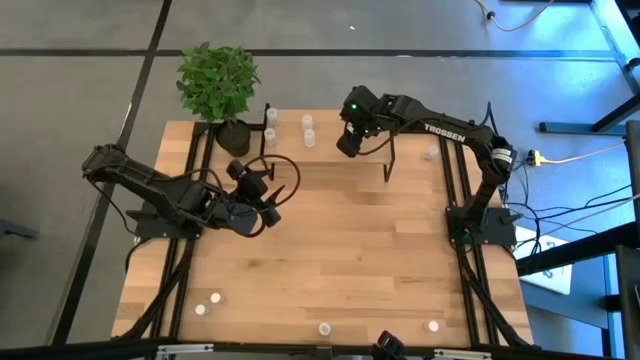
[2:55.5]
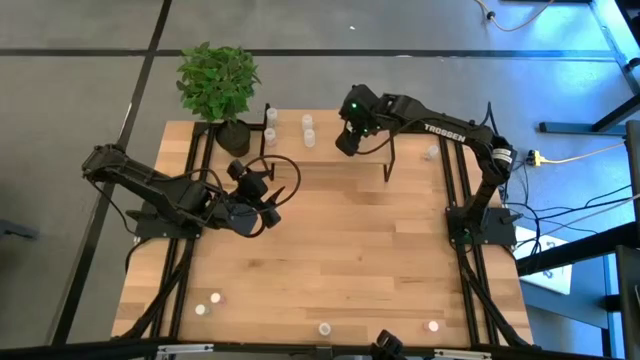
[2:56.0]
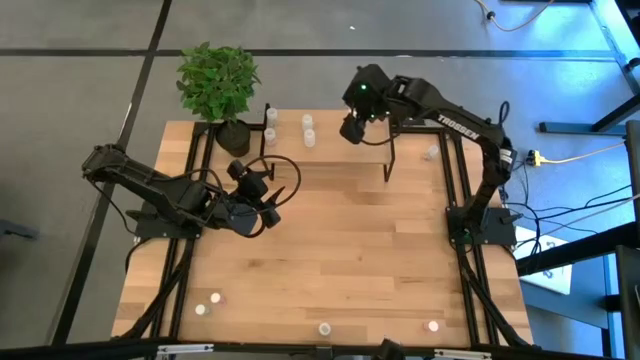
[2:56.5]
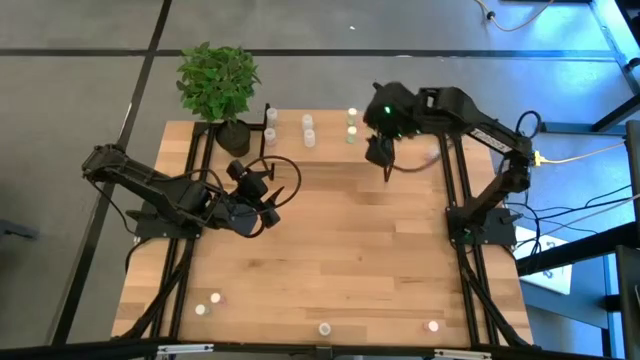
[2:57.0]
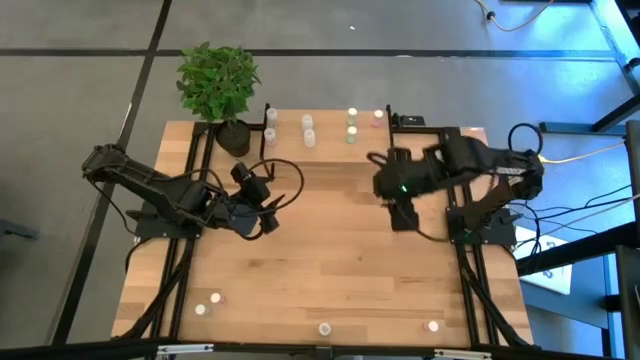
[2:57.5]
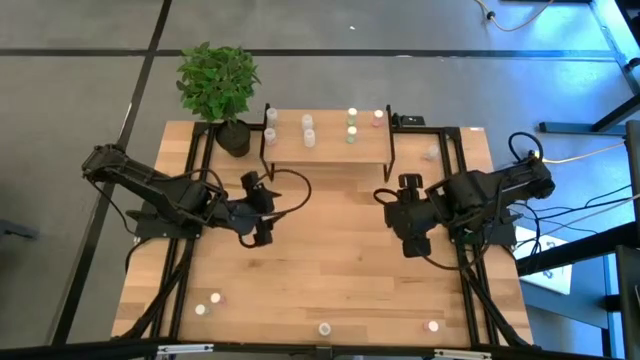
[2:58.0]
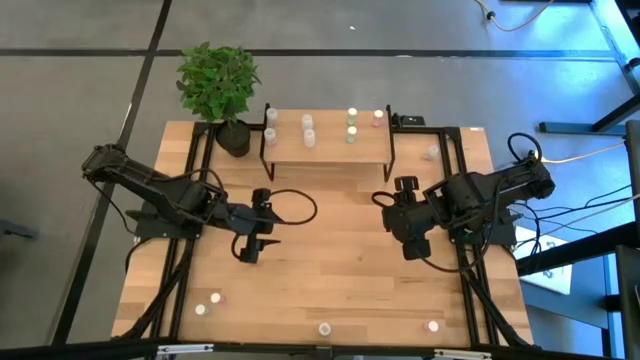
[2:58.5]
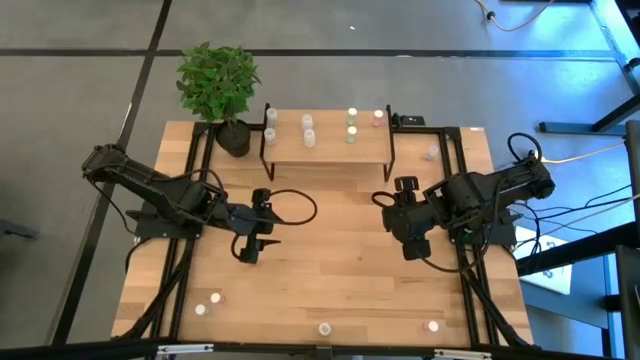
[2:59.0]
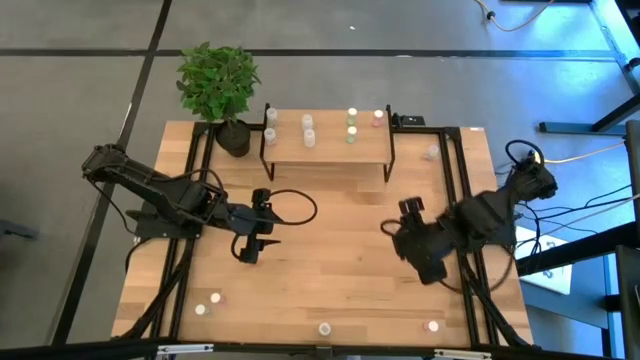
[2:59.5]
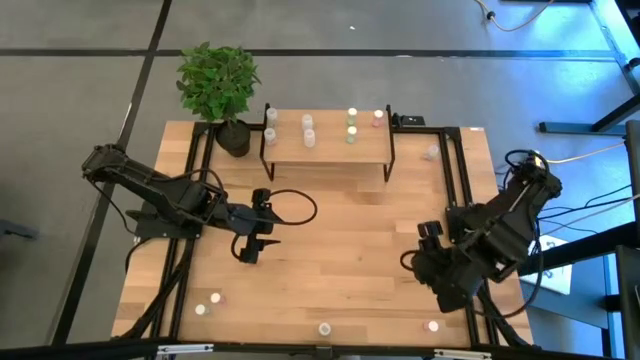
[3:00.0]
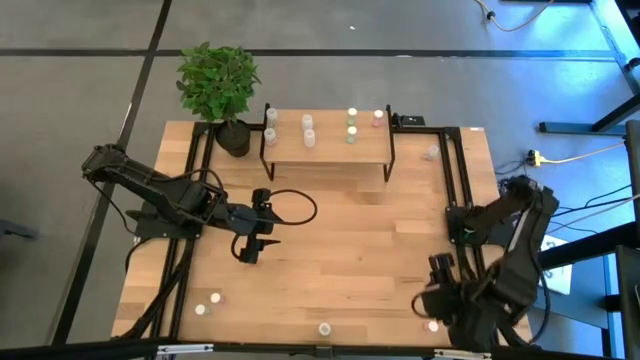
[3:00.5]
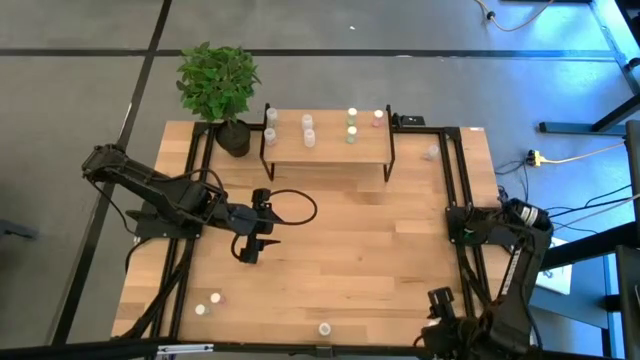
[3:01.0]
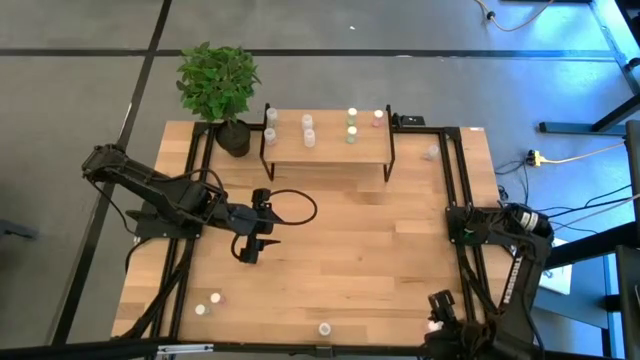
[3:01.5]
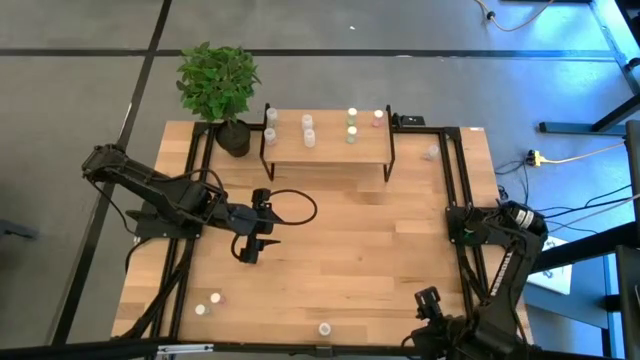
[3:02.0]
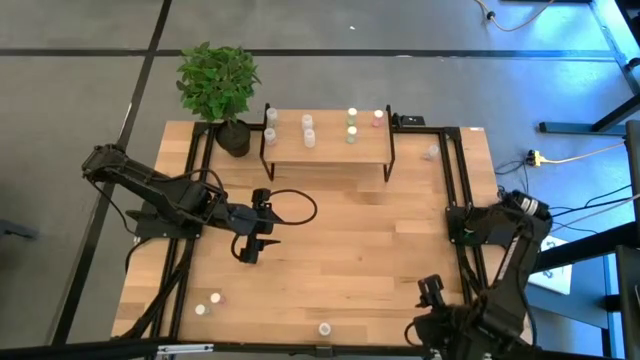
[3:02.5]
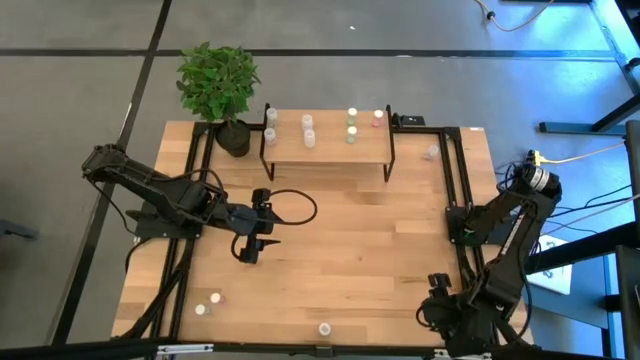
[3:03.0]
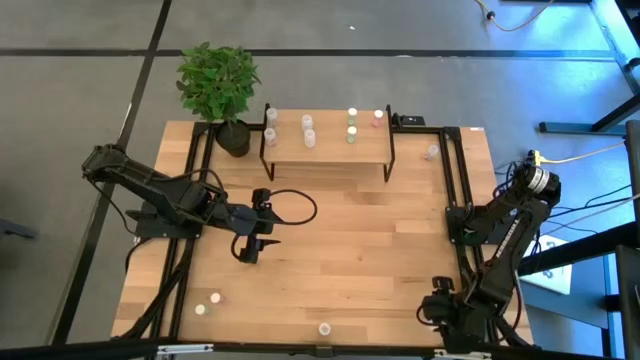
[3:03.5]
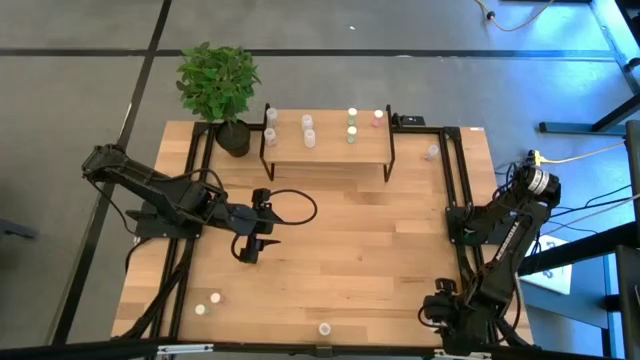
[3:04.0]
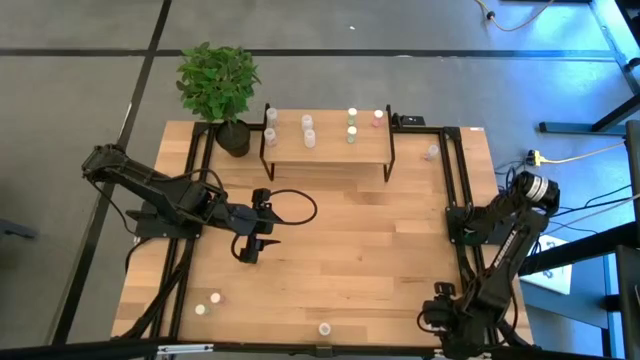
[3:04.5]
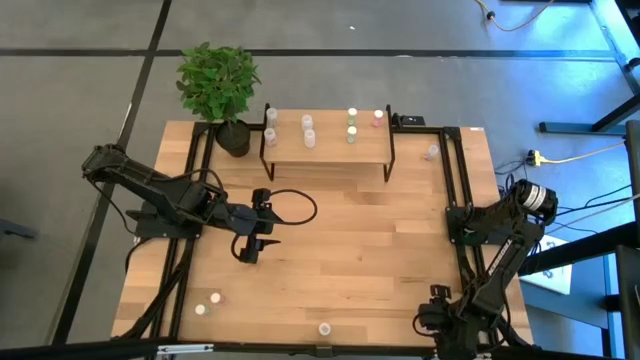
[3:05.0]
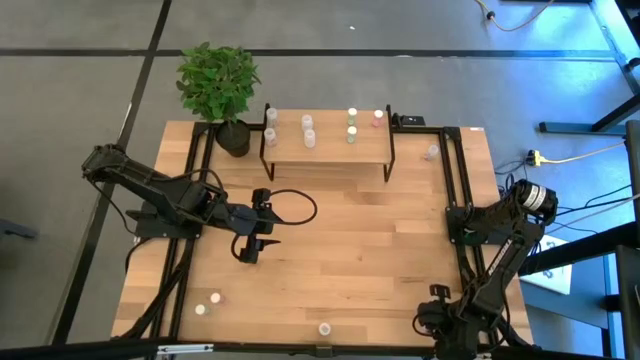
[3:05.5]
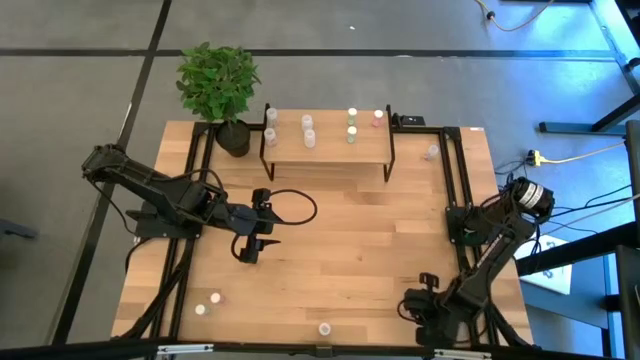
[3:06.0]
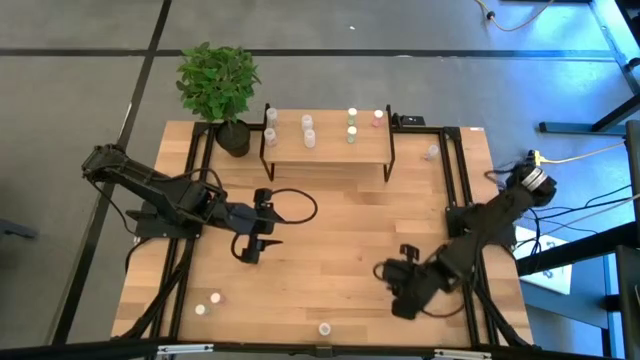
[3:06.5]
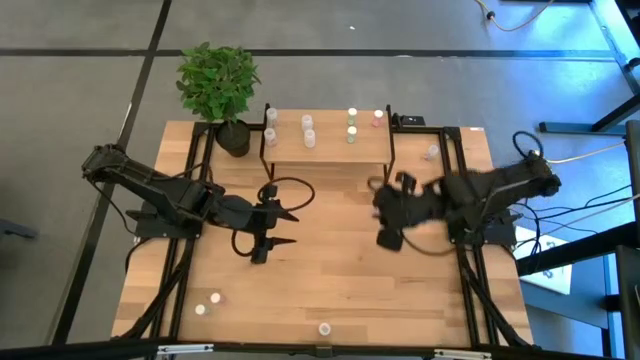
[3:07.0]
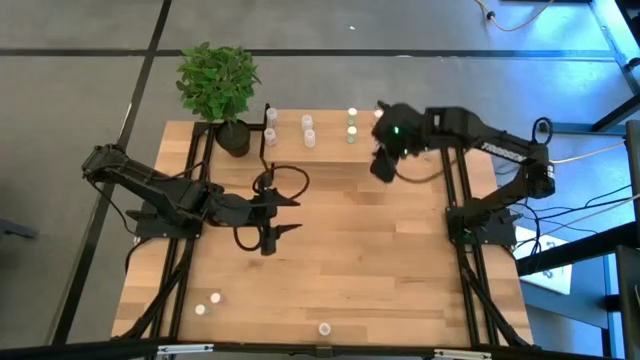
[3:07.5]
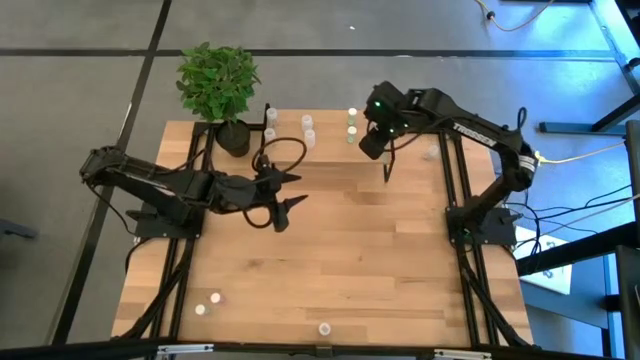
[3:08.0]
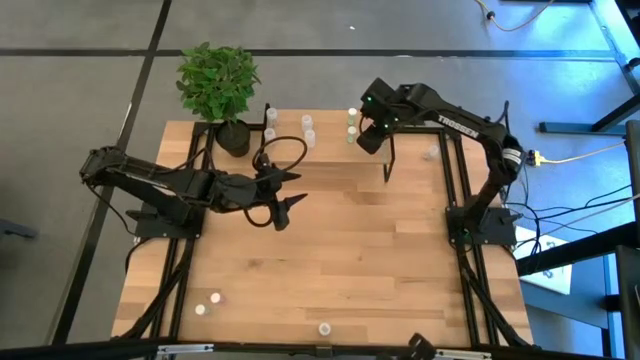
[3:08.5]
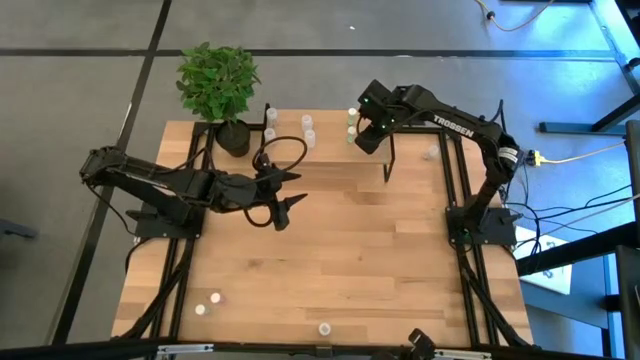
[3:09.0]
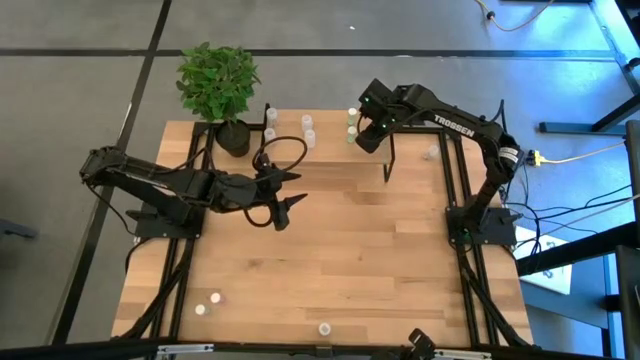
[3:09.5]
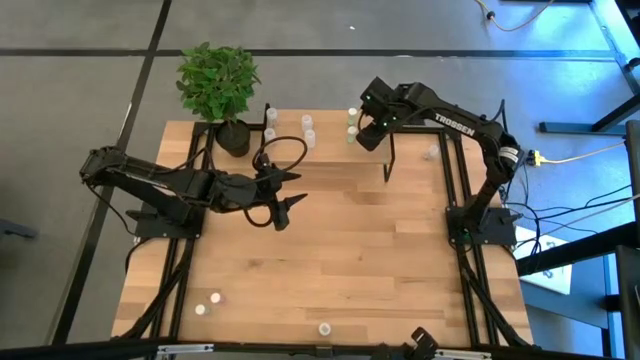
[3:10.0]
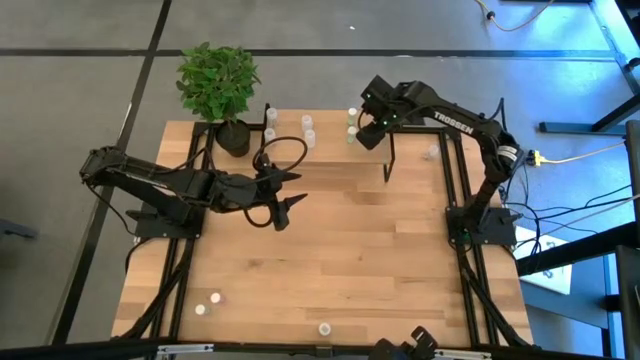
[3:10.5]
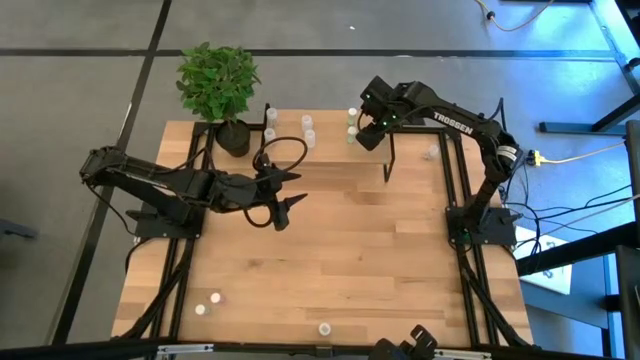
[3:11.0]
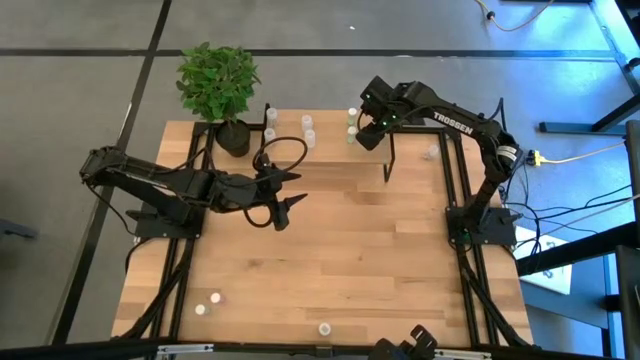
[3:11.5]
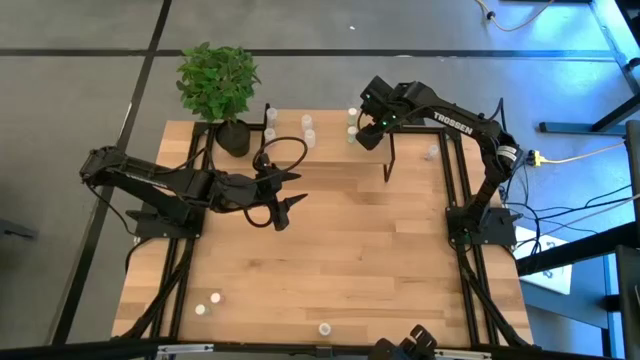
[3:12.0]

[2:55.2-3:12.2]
Task: Pick and place medicine bottles onto shelf by color
Put the right red pill bottle on the shelf aligned with the other red pill bottle

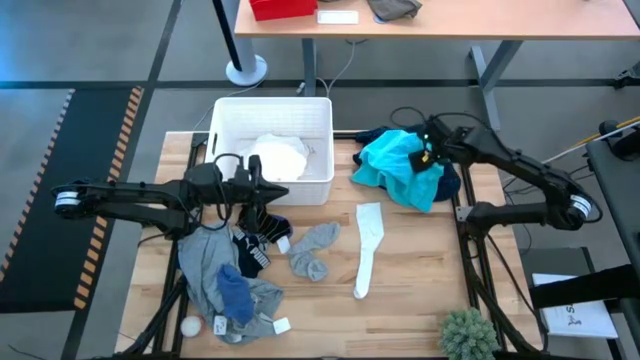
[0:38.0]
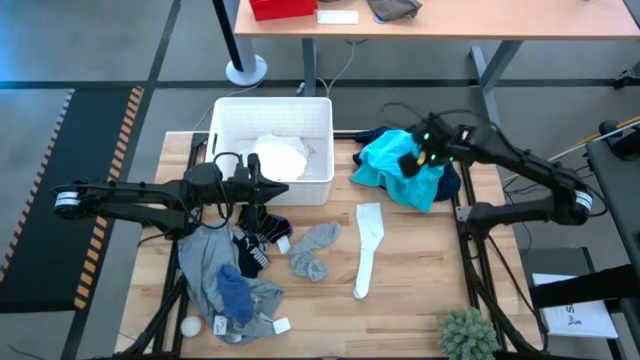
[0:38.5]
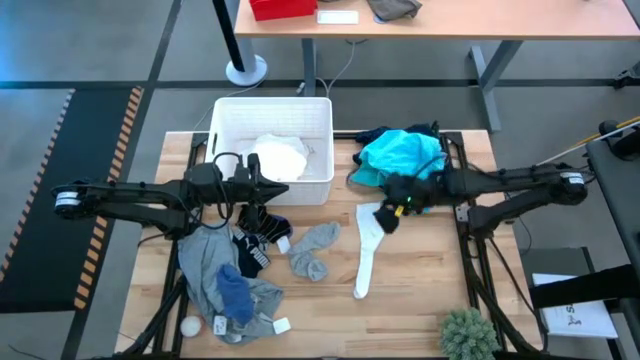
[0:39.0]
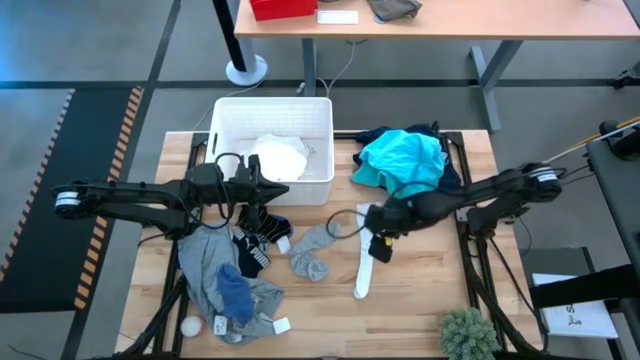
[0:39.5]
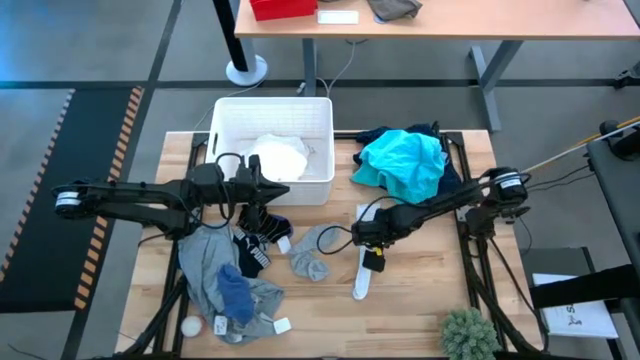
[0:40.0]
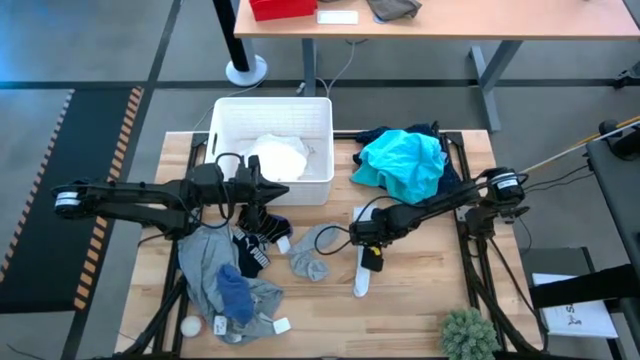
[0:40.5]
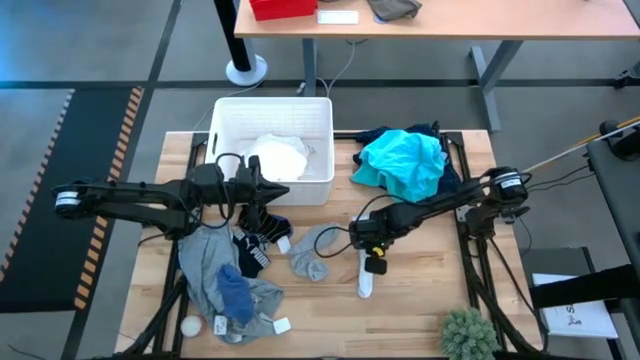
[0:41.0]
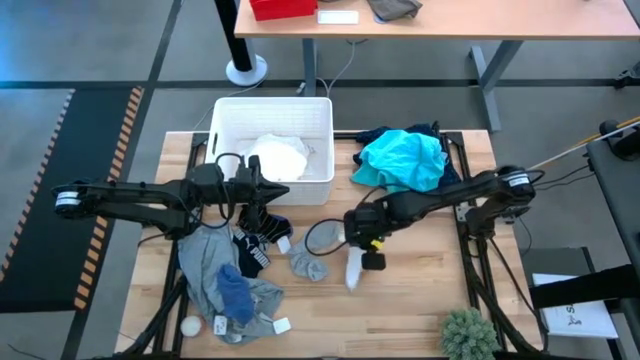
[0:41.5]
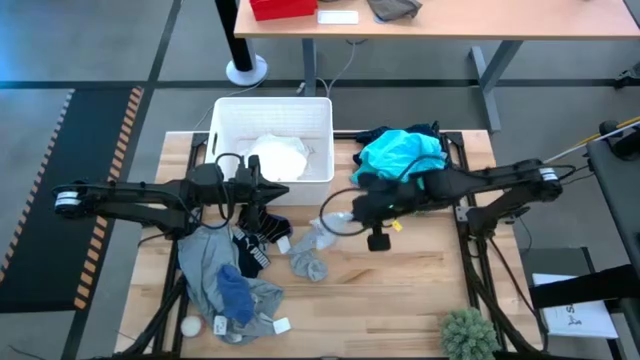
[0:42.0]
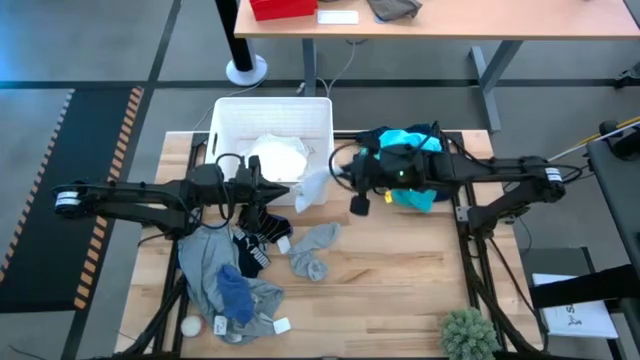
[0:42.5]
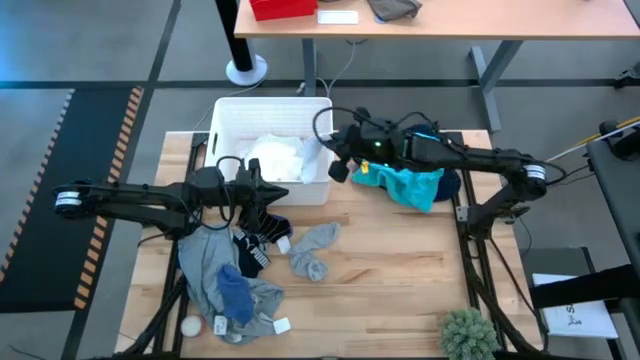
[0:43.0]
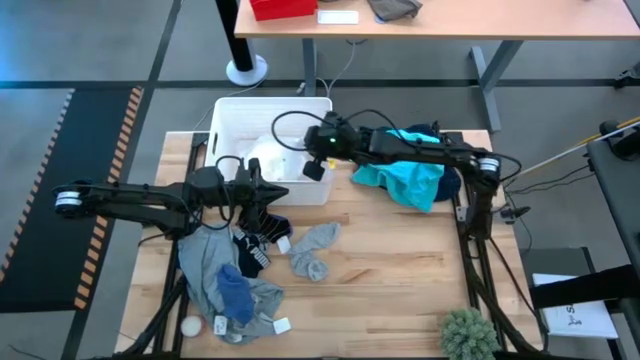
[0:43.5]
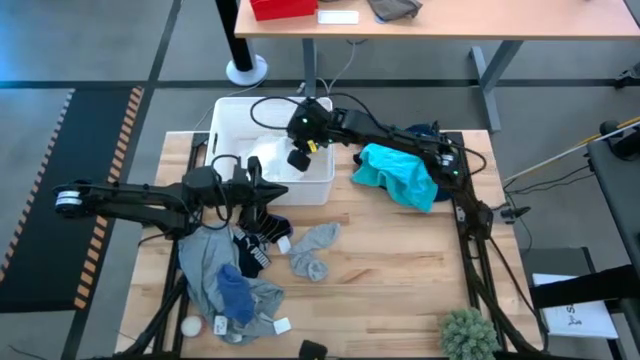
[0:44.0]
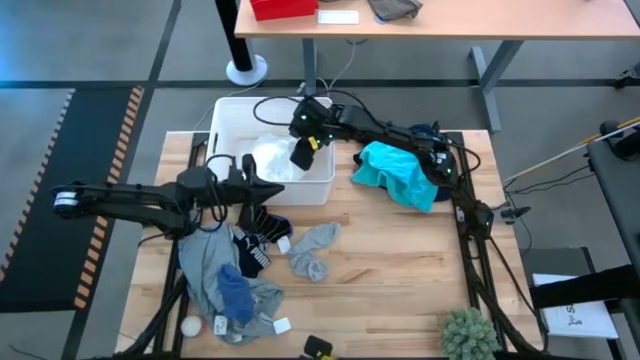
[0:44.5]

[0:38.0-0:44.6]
Task: Sort clothes
Put the white sock into the white bin
